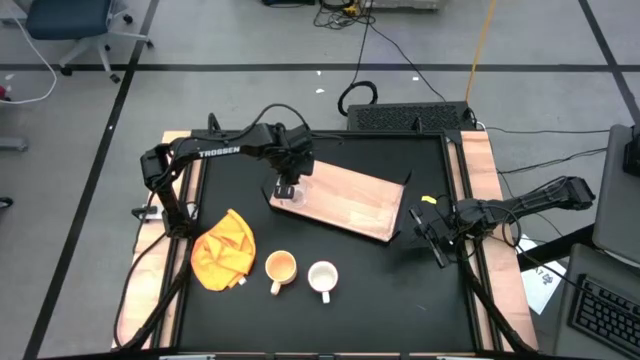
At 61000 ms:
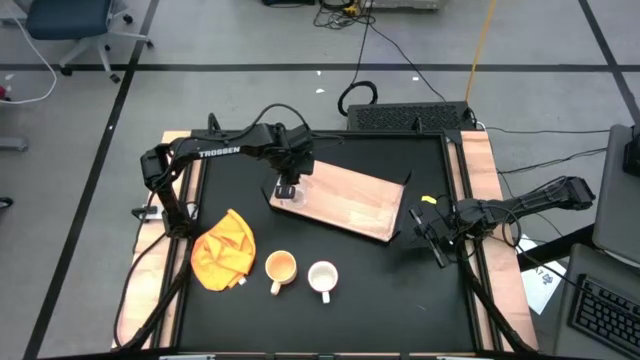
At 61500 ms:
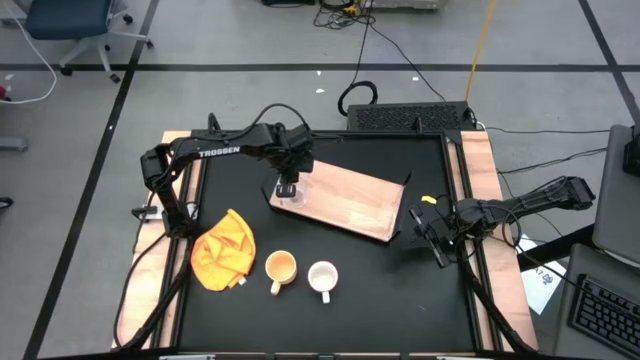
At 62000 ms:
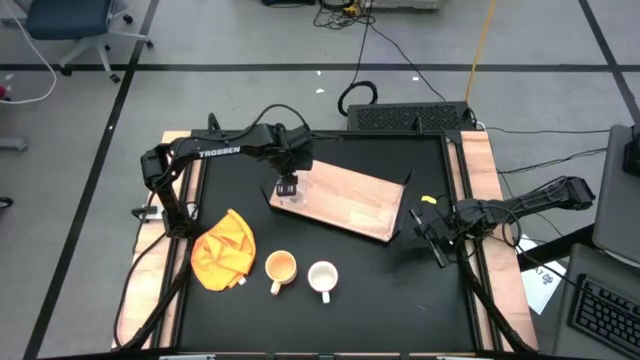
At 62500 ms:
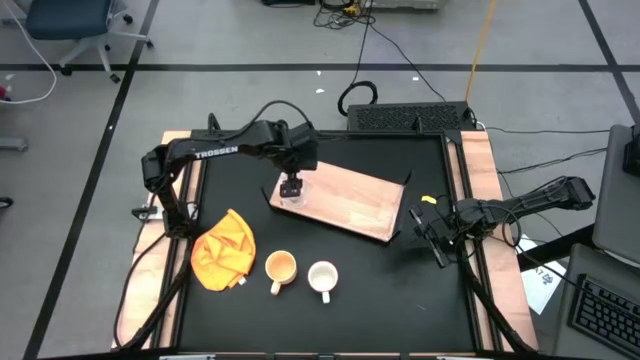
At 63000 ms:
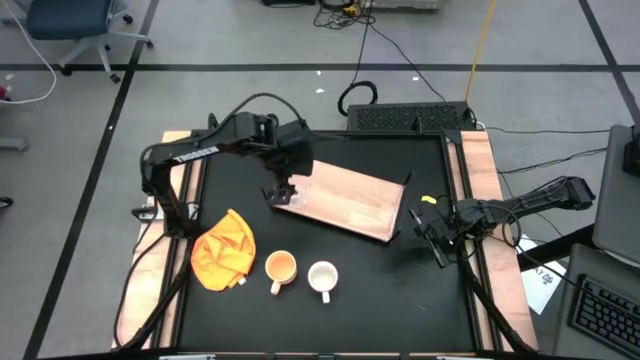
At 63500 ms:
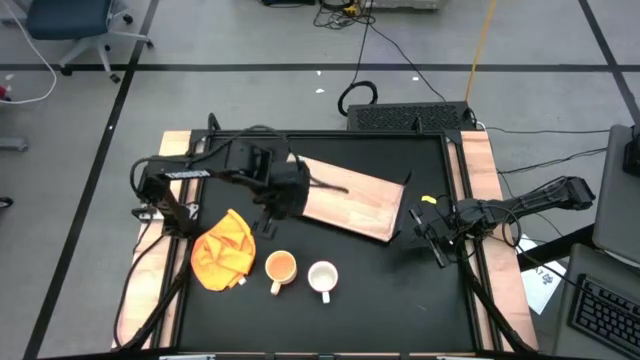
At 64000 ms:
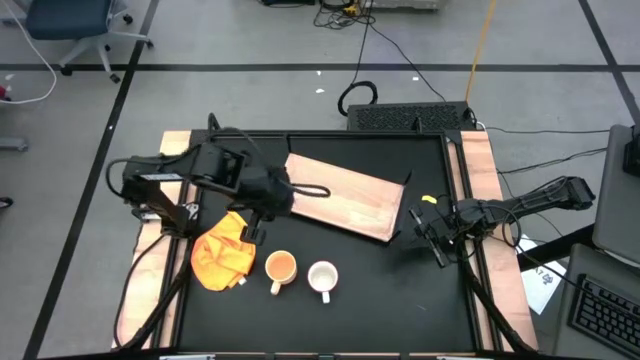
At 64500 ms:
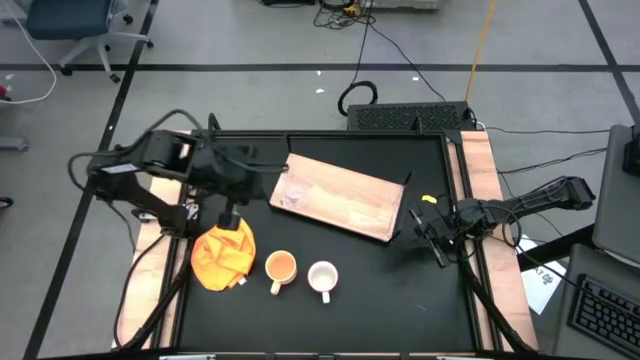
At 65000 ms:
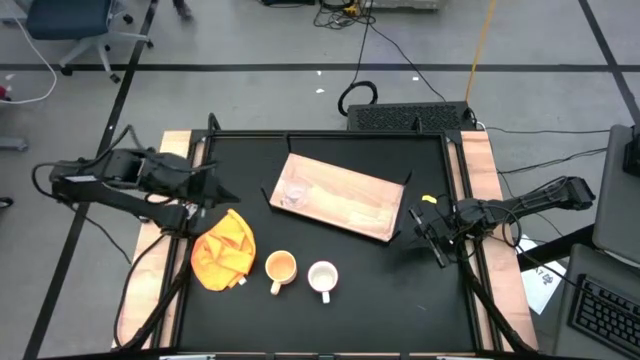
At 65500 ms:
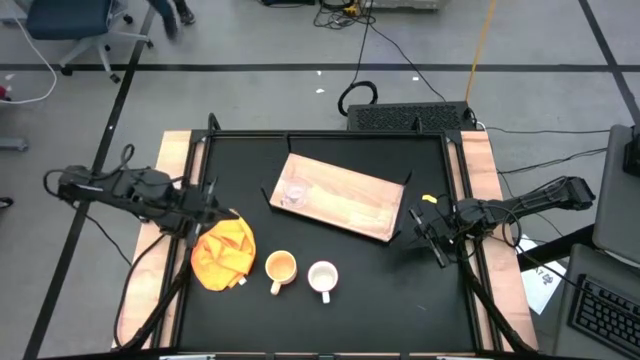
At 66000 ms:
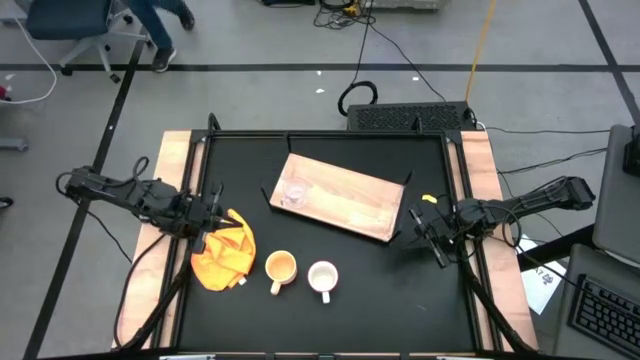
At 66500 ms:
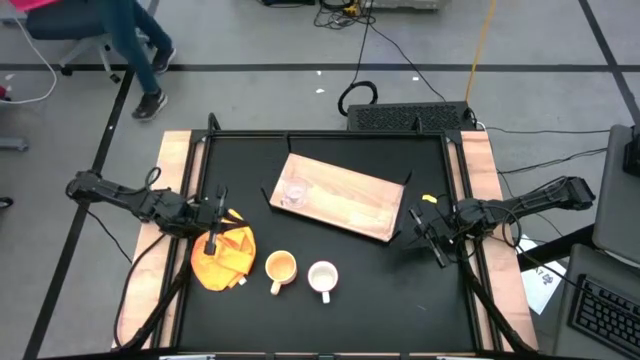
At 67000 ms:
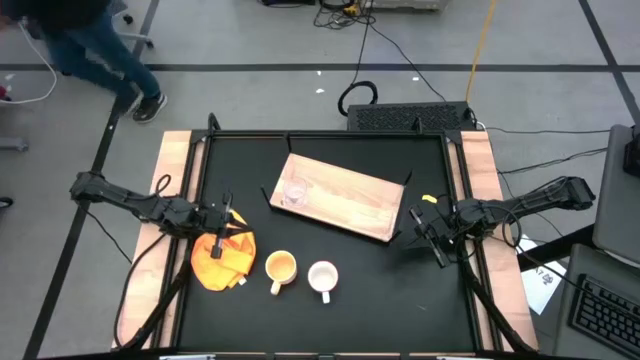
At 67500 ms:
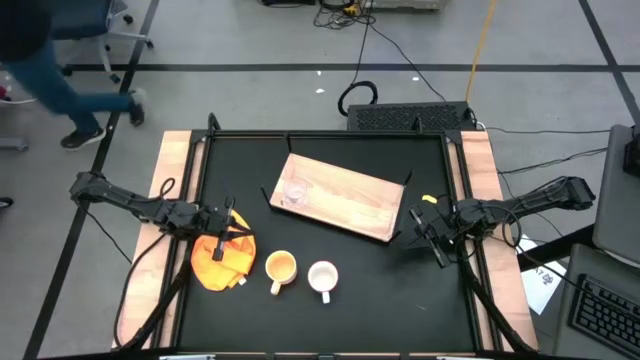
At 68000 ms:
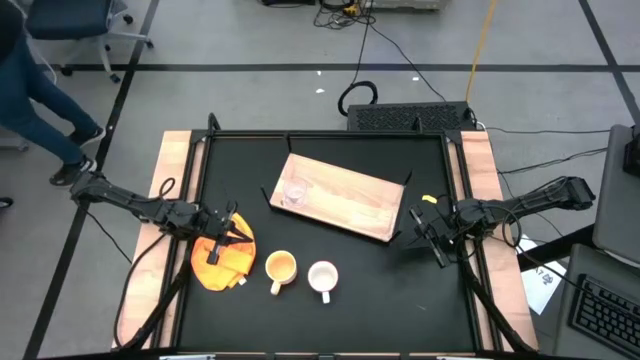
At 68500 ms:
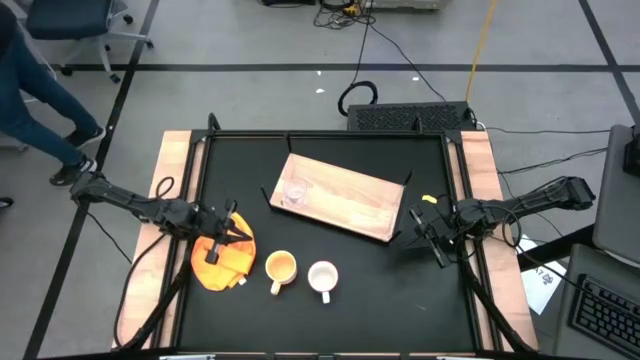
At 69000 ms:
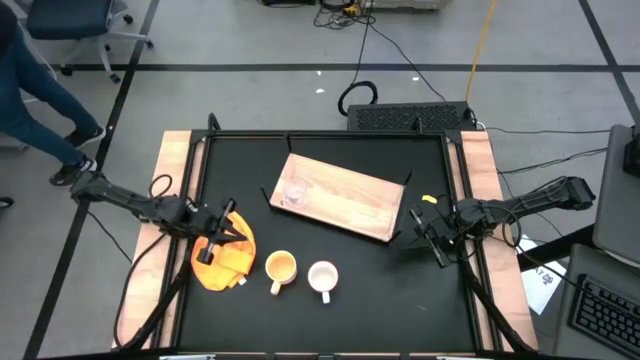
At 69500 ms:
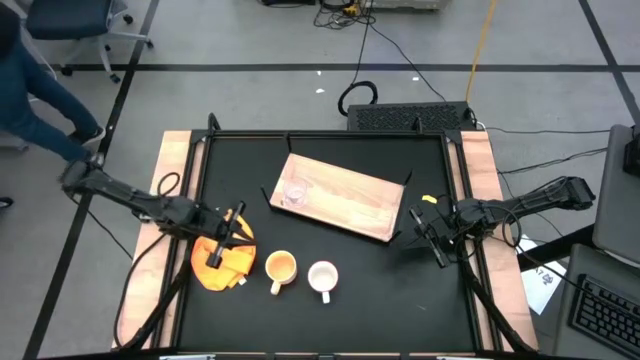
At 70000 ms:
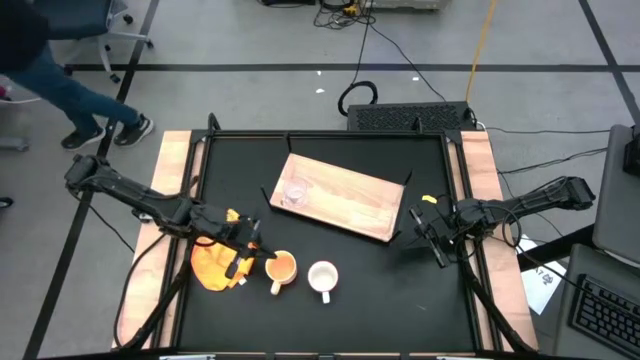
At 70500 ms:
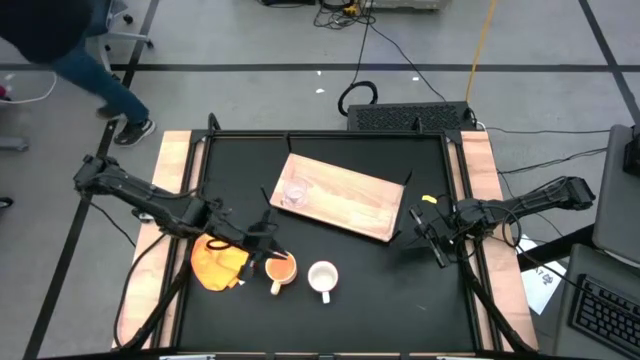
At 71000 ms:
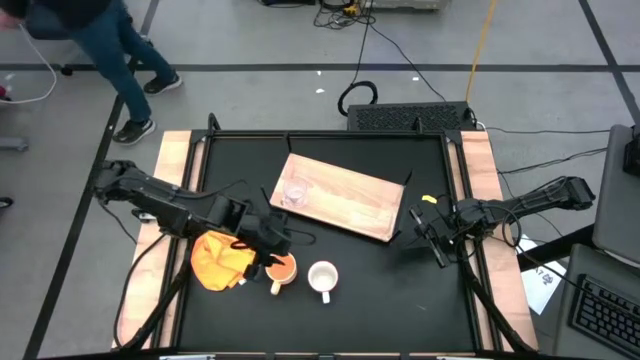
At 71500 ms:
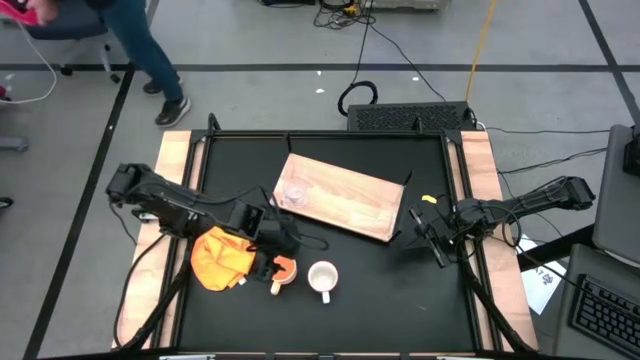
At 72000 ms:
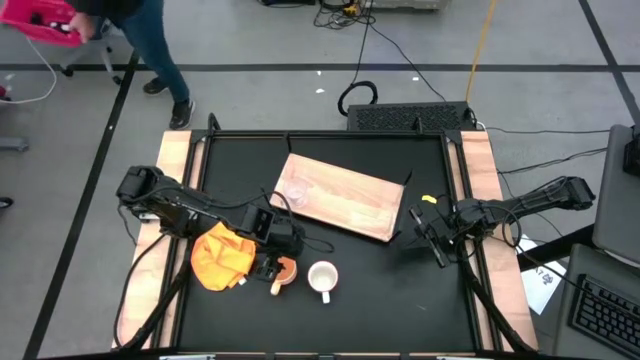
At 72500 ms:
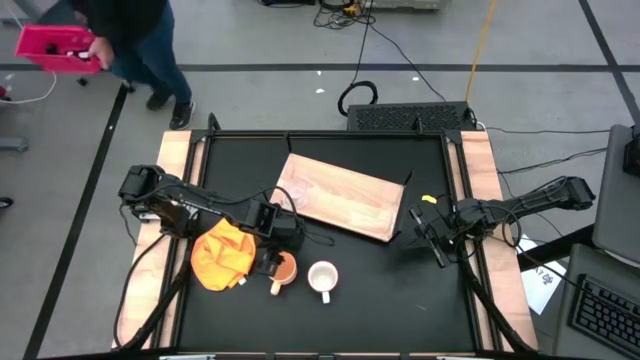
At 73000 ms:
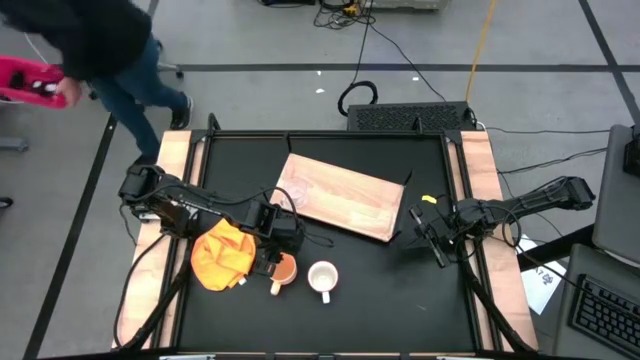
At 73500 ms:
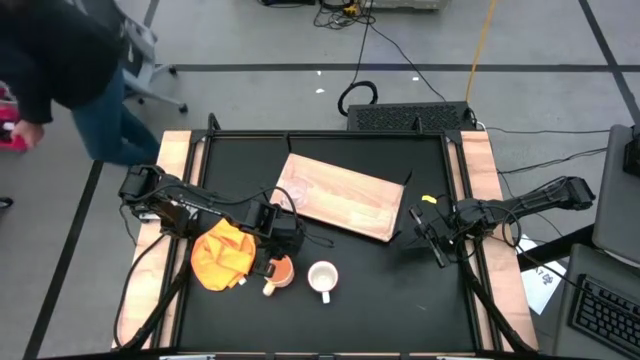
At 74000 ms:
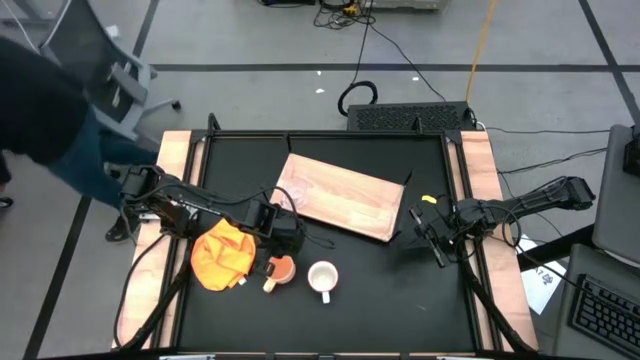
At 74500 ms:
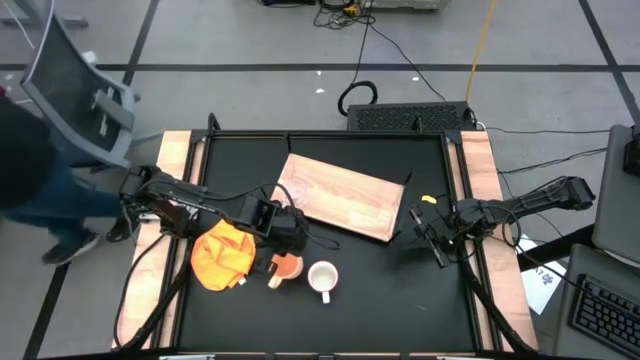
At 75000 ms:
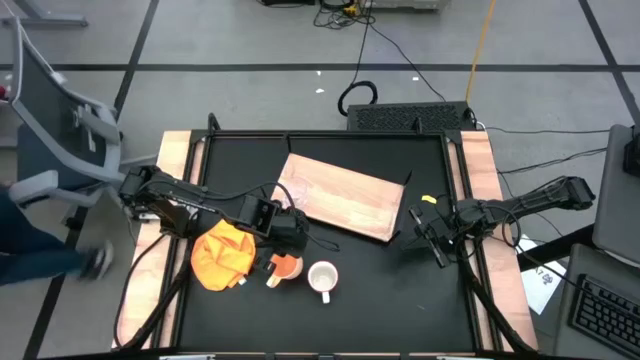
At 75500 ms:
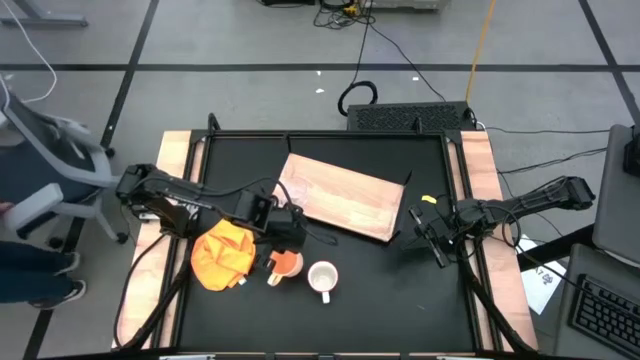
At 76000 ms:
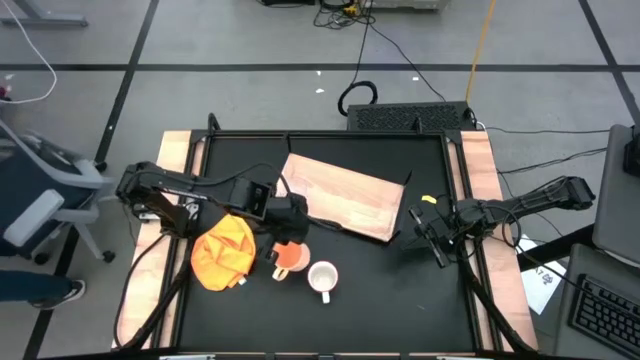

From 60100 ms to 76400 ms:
Task: Stack small to large cups/mugs on shelf
Put the light orange mug on the shelf
